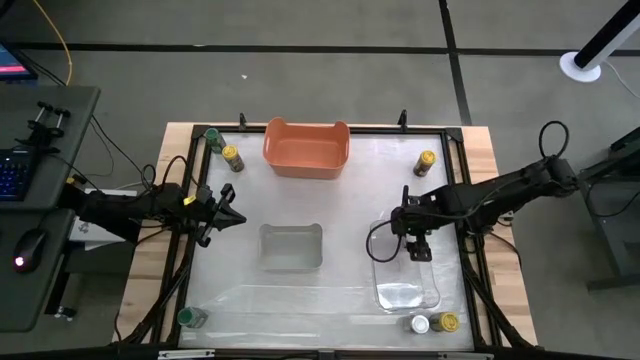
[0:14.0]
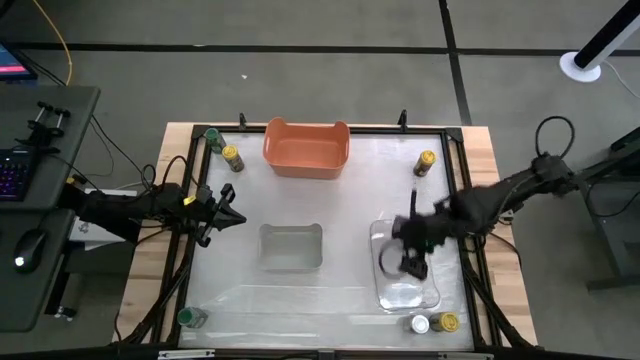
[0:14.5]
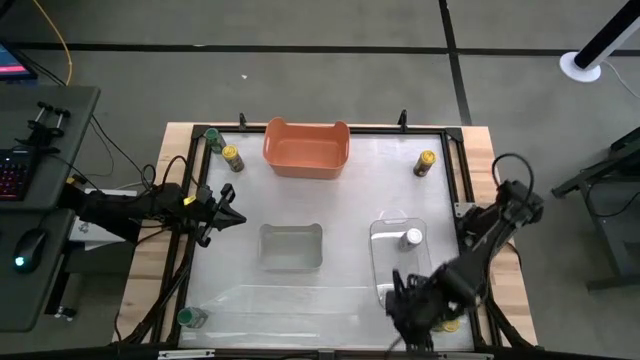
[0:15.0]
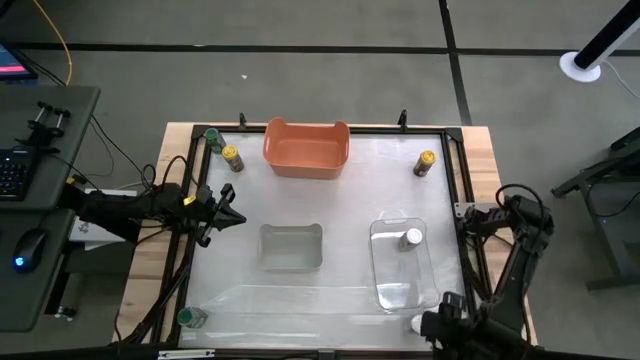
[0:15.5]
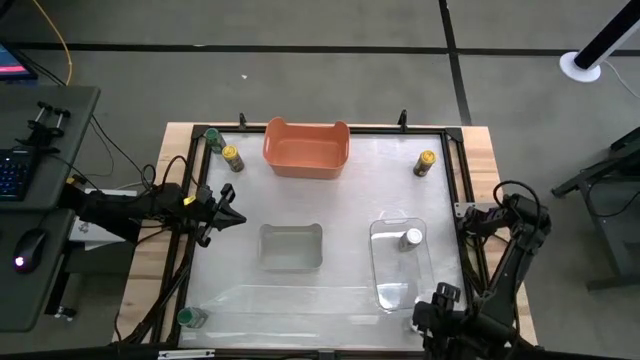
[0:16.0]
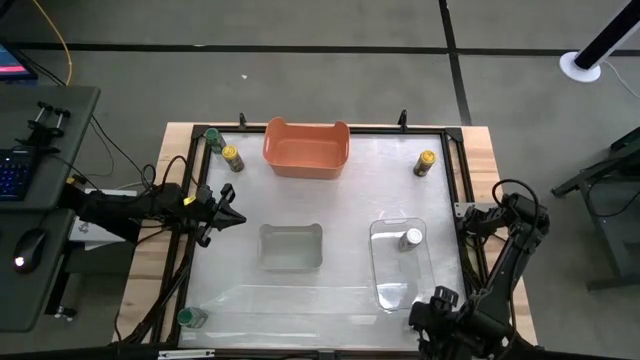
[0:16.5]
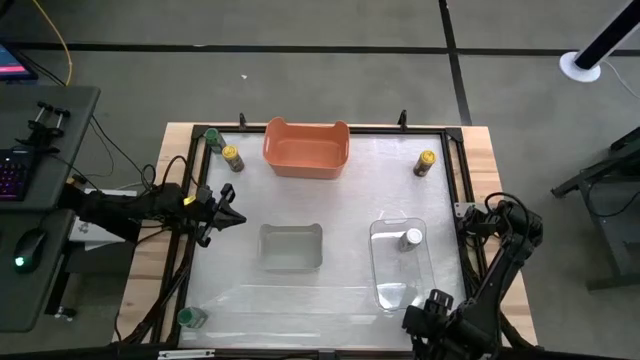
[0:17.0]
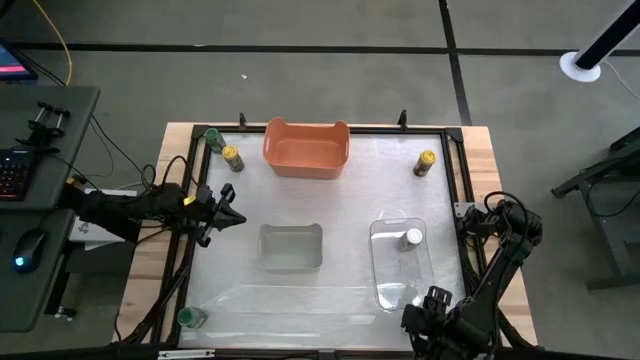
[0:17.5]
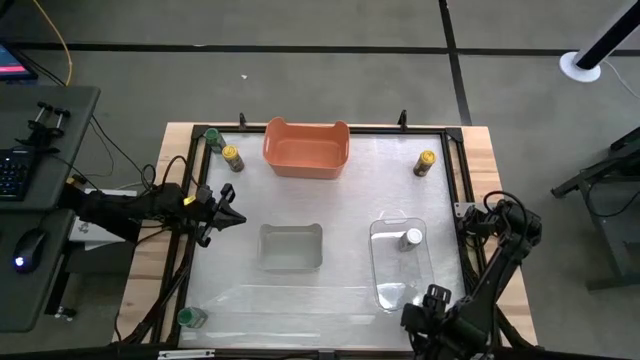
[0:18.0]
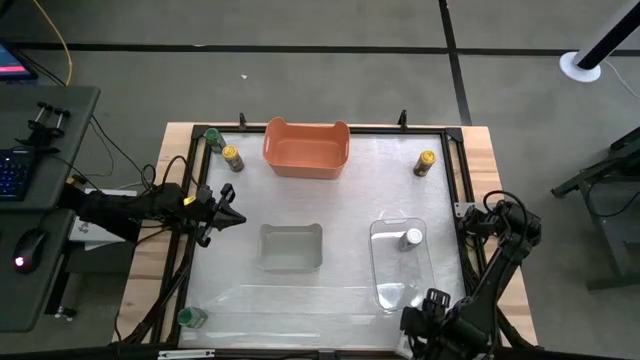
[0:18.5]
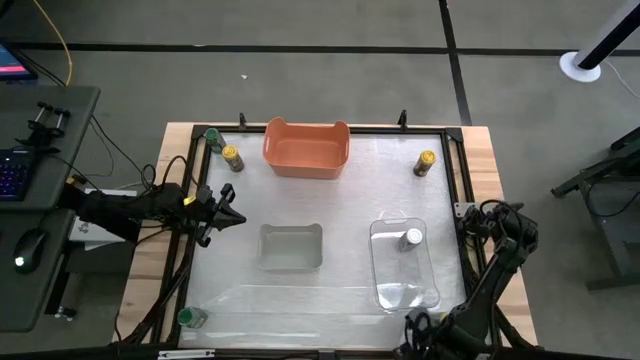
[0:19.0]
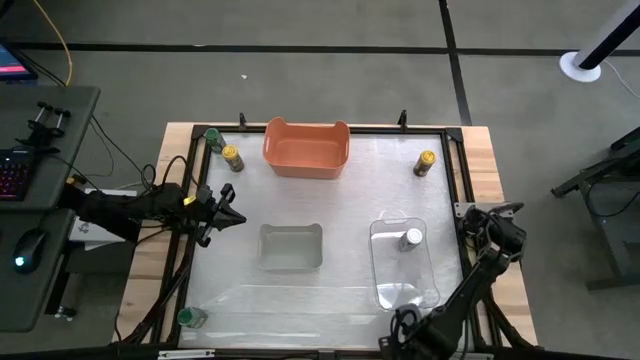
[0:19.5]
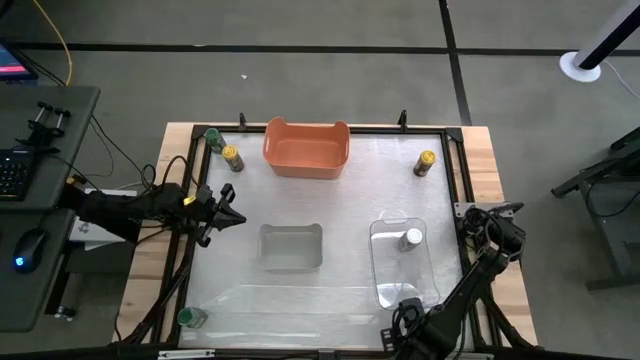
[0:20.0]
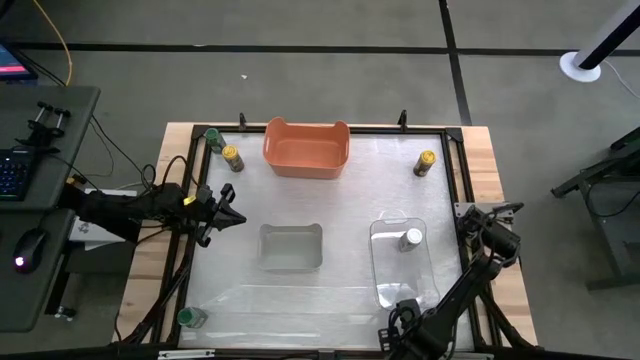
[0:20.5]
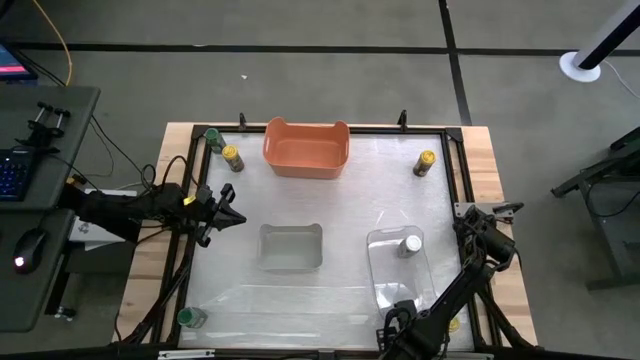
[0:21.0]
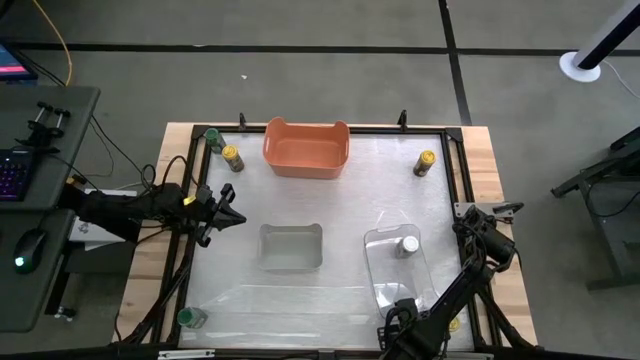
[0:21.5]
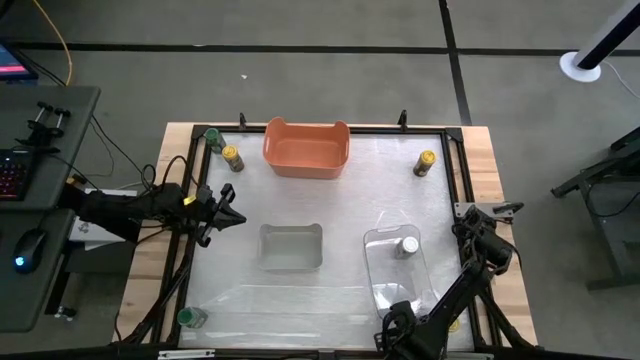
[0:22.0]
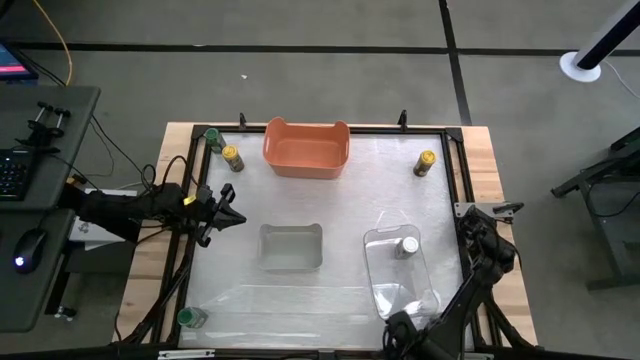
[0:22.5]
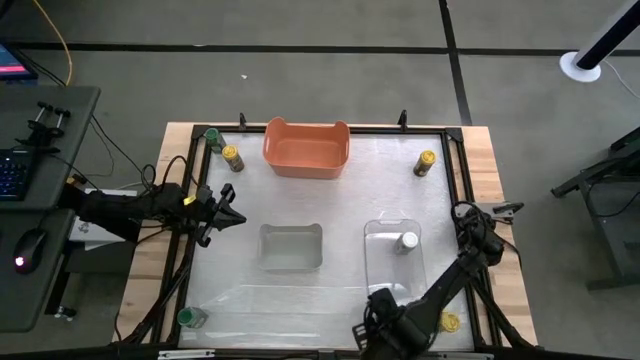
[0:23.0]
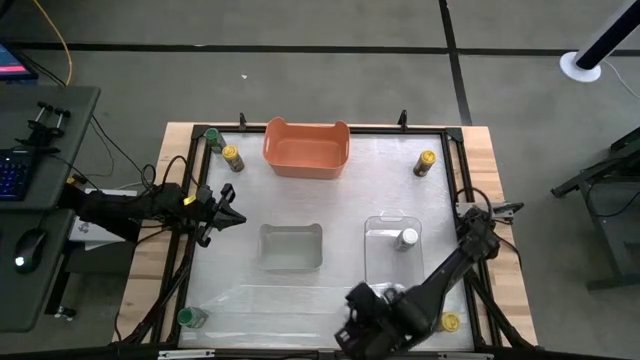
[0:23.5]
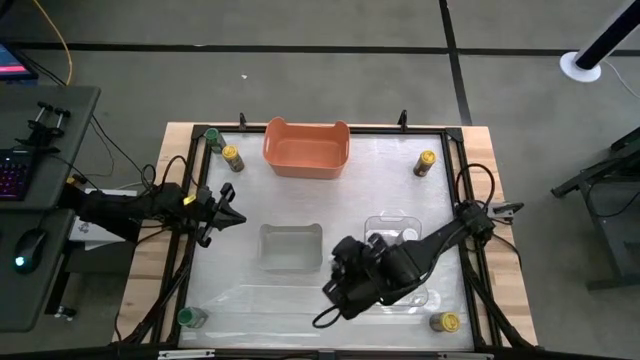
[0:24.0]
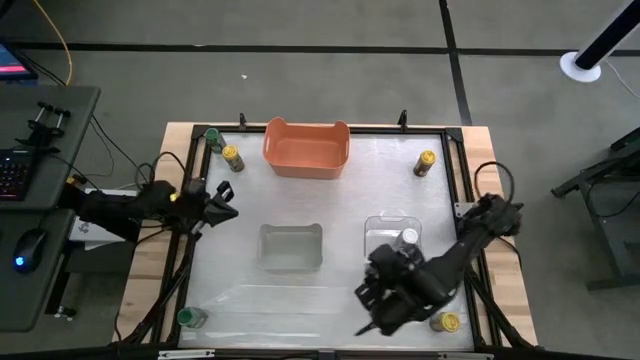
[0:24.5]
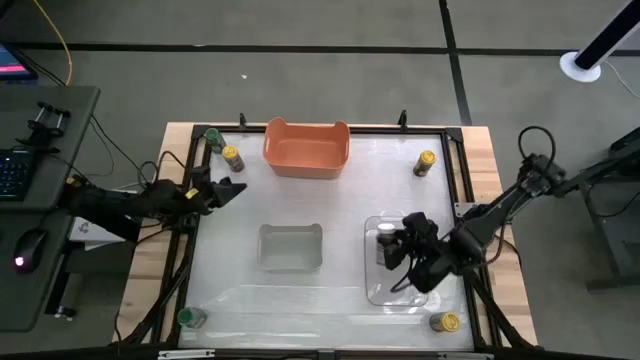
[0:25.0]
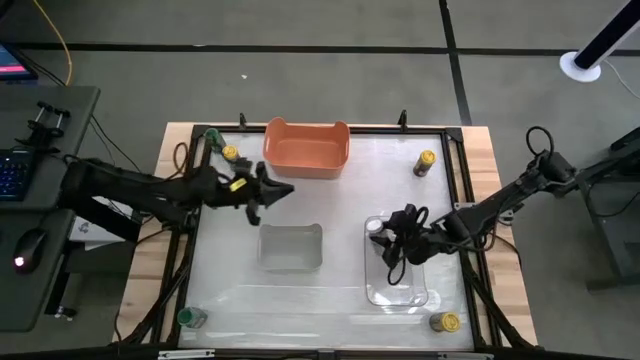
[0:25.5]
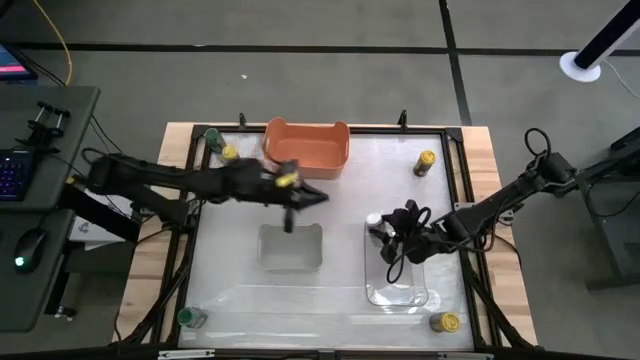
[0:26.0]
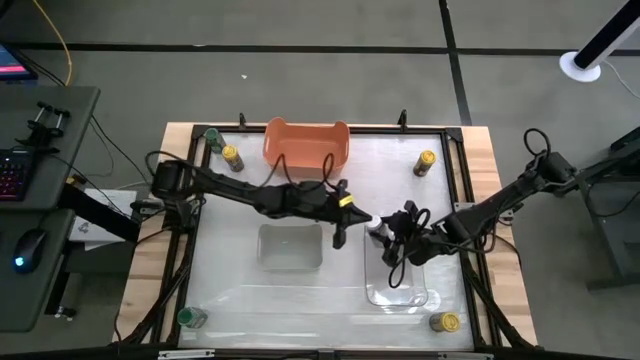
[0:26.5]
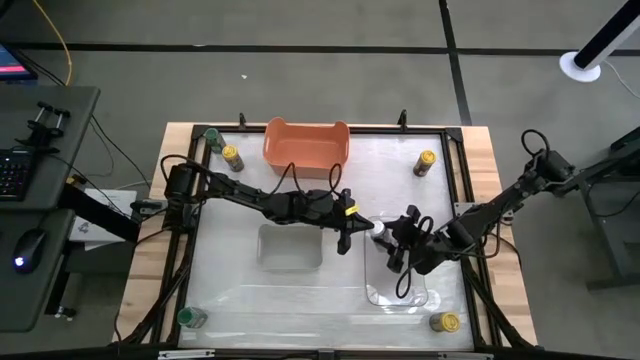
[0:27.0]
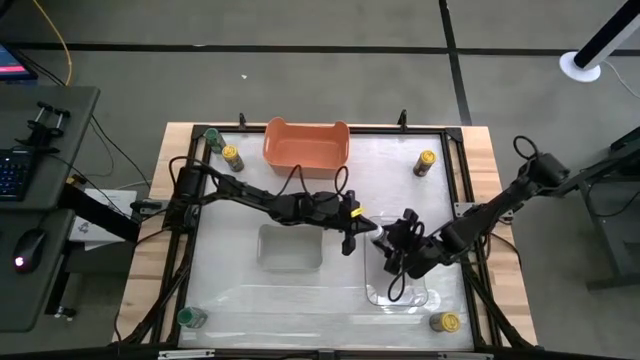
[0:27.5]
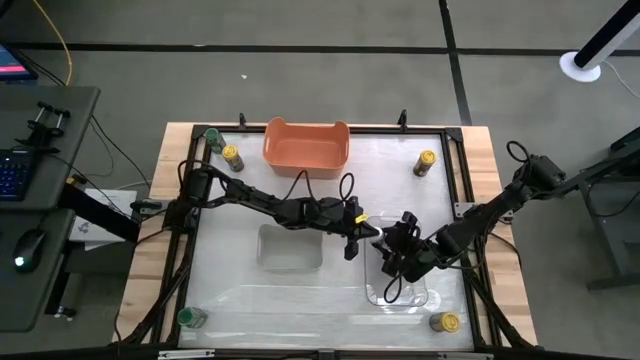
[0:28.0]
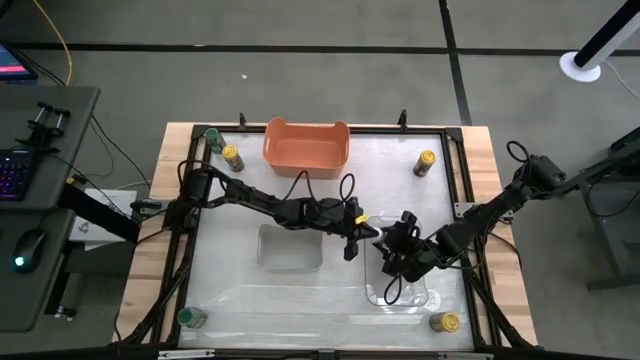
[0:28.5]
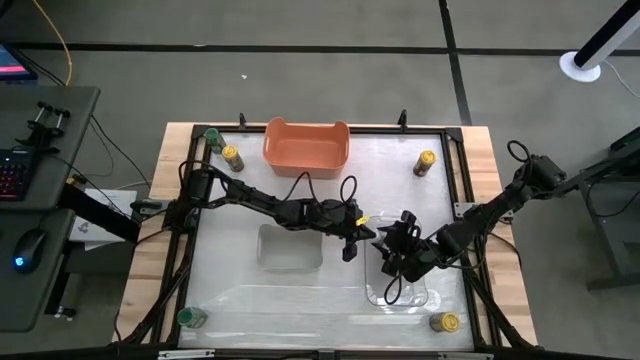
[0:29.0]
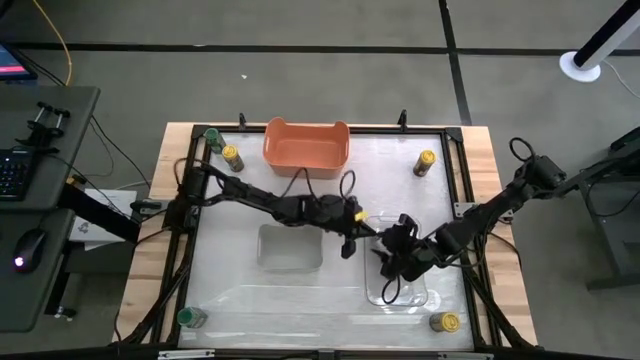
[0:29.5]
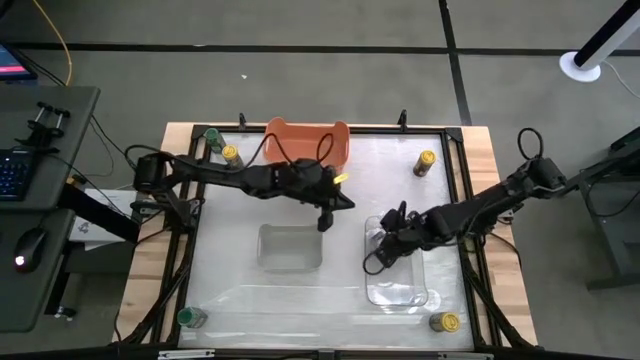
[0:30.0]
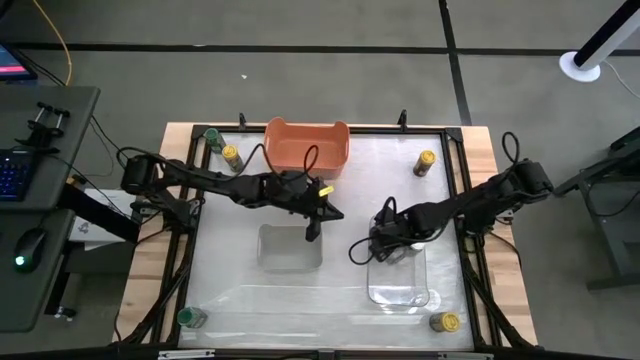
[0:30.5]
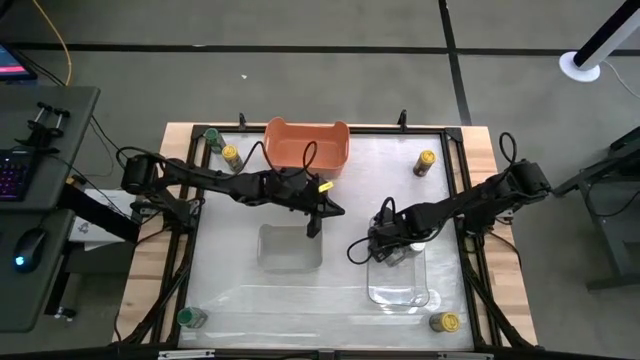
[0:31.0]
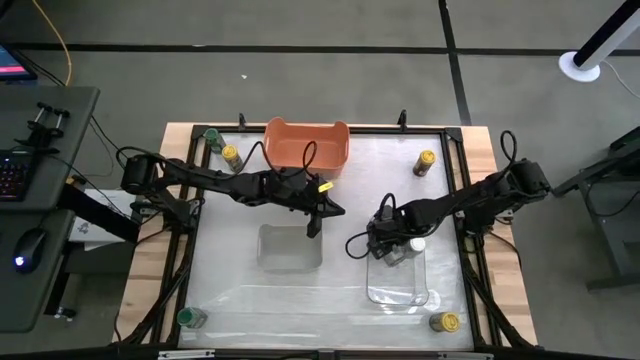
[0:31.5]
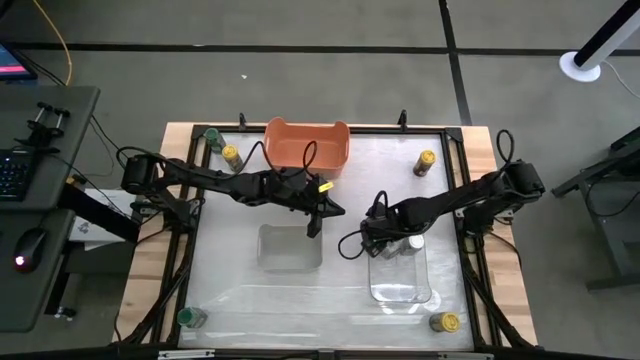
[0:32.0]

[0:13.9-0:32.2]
Task: Sort spices by type
Put the white seasoning bottle into the transparent bin
